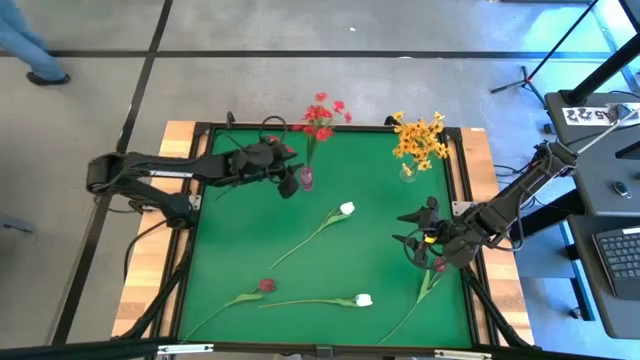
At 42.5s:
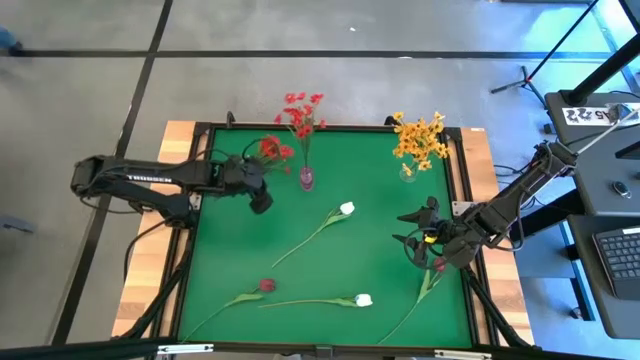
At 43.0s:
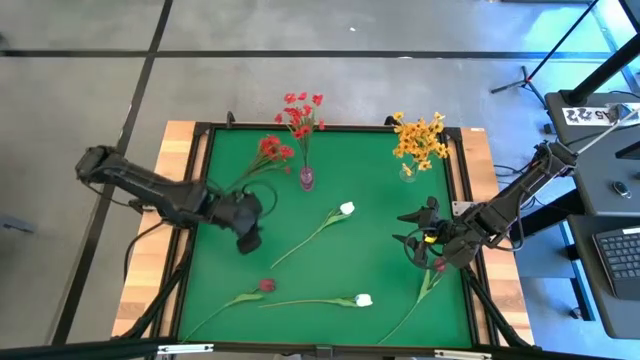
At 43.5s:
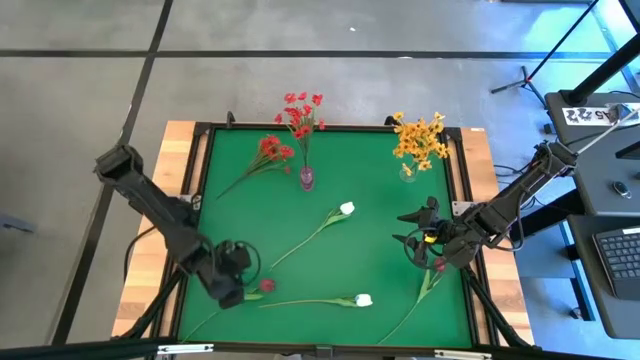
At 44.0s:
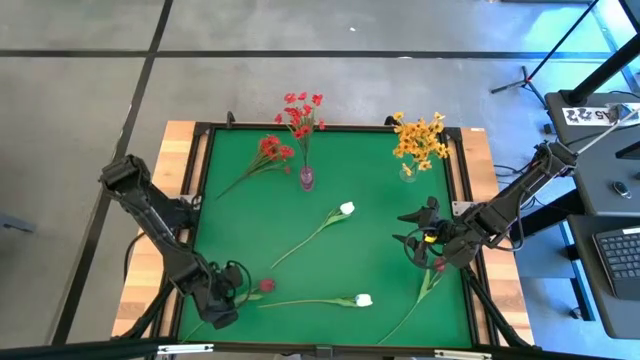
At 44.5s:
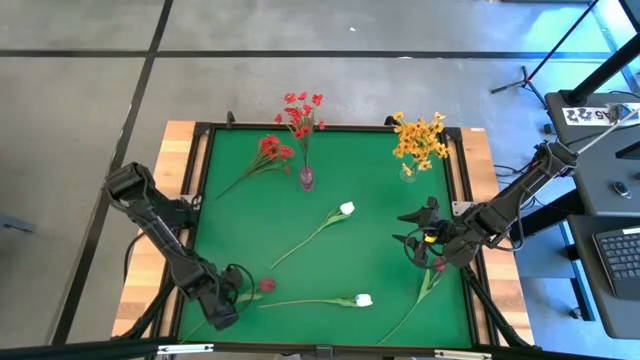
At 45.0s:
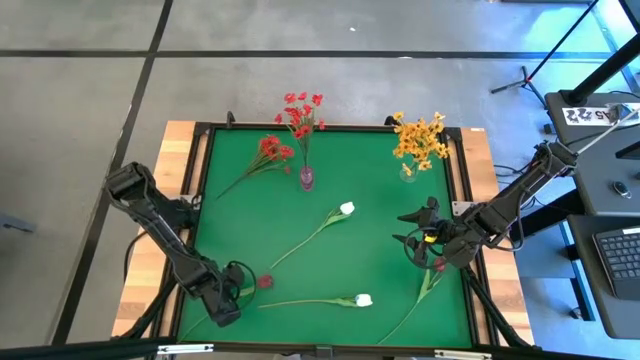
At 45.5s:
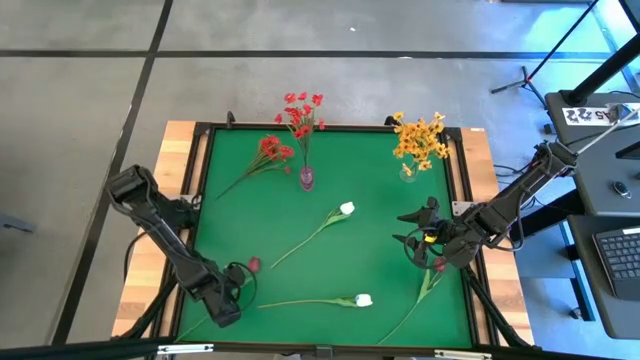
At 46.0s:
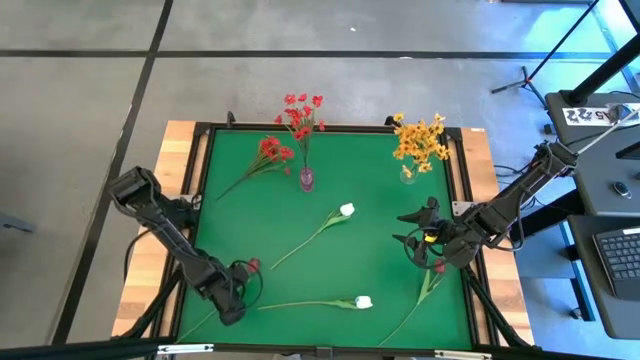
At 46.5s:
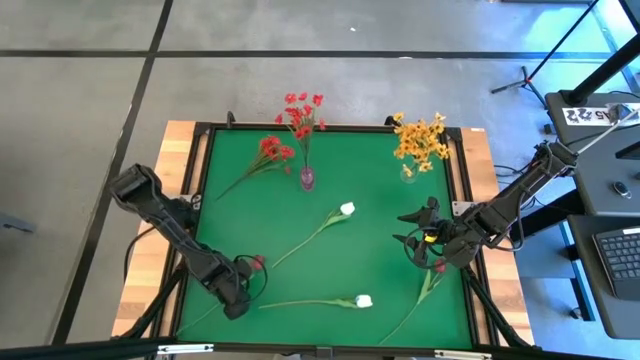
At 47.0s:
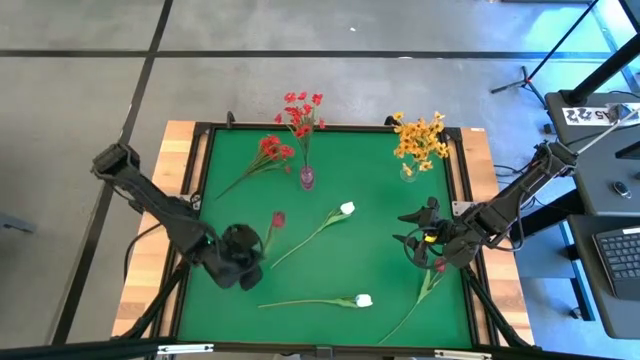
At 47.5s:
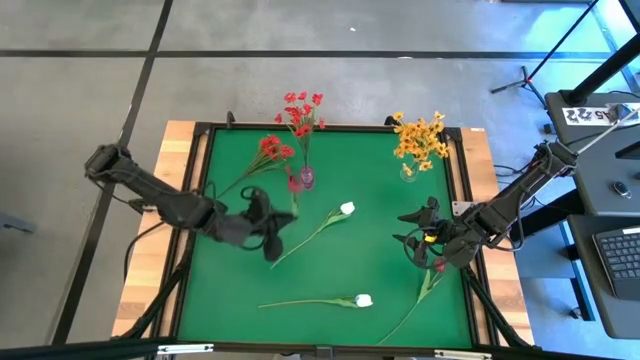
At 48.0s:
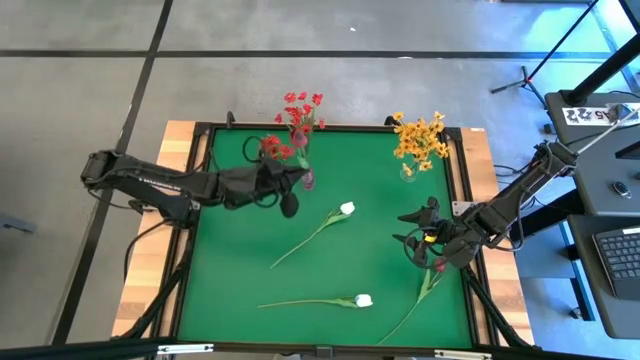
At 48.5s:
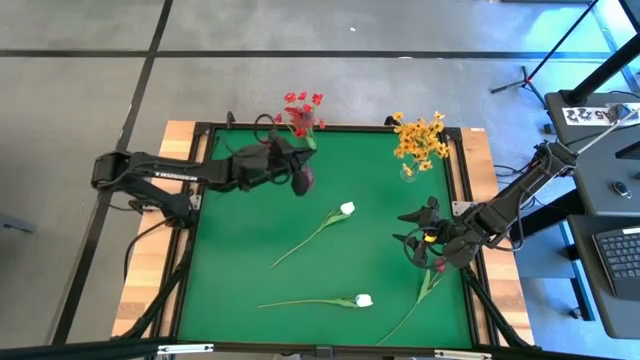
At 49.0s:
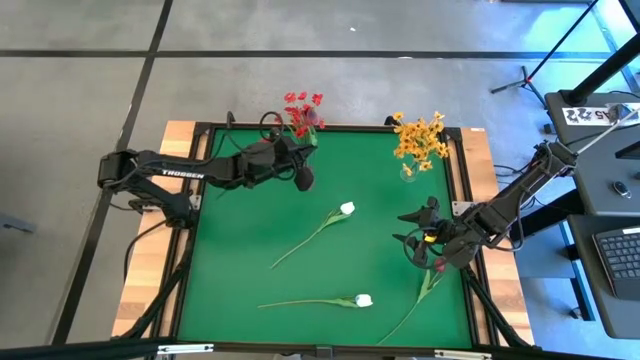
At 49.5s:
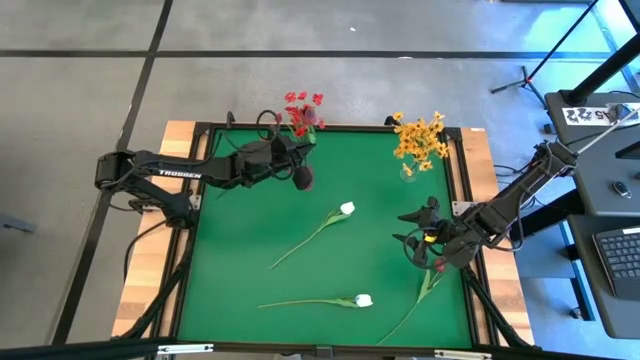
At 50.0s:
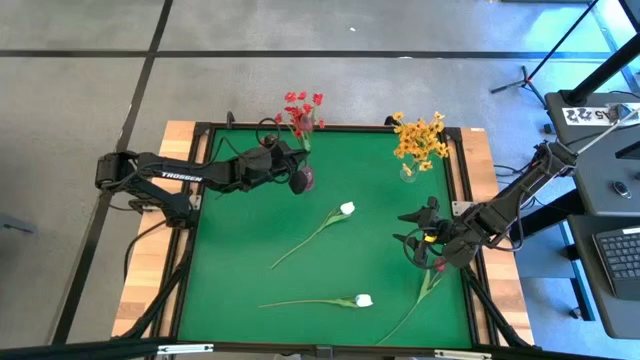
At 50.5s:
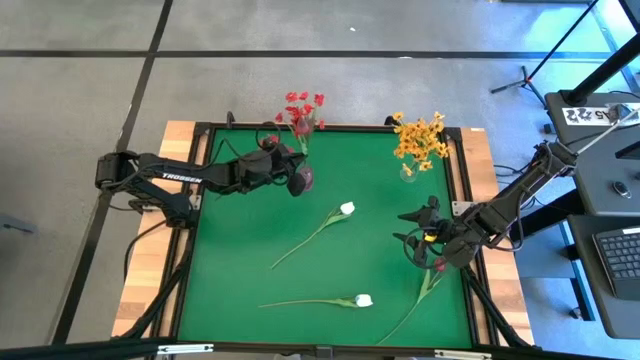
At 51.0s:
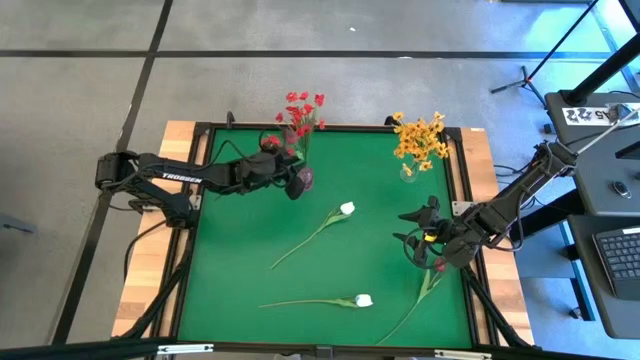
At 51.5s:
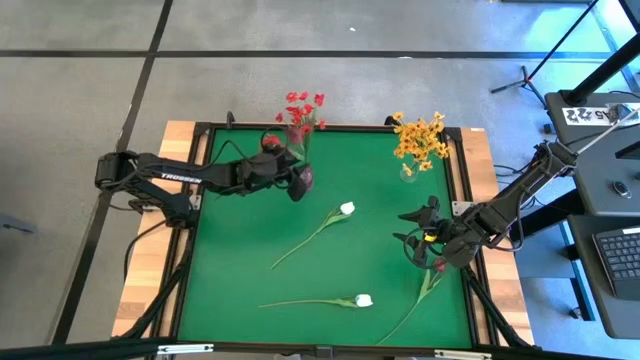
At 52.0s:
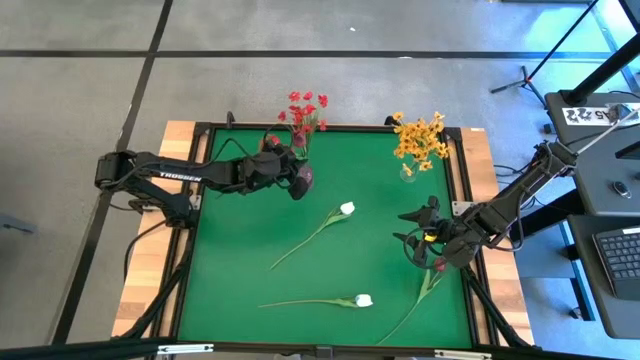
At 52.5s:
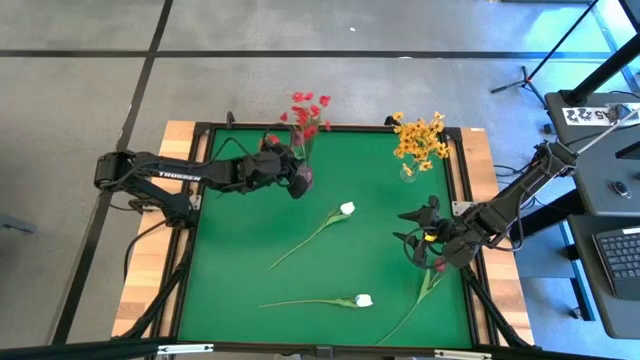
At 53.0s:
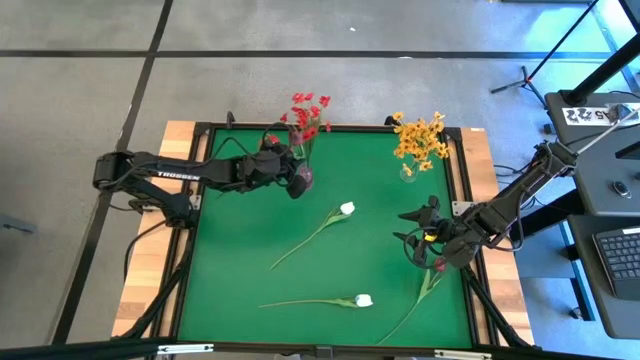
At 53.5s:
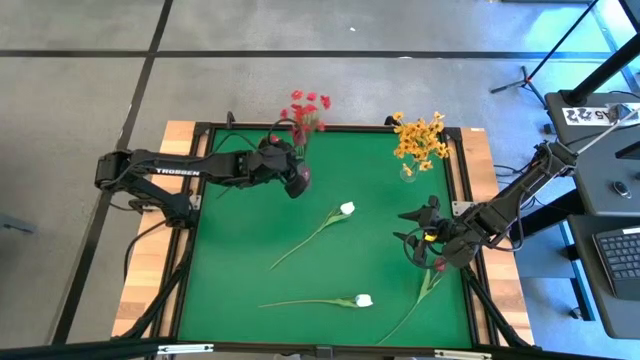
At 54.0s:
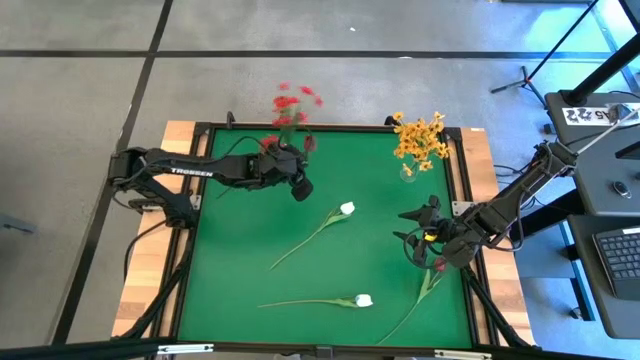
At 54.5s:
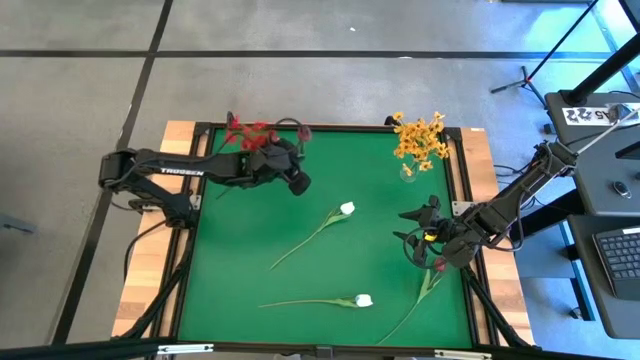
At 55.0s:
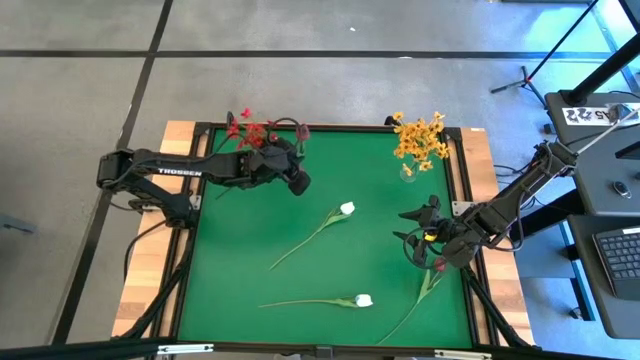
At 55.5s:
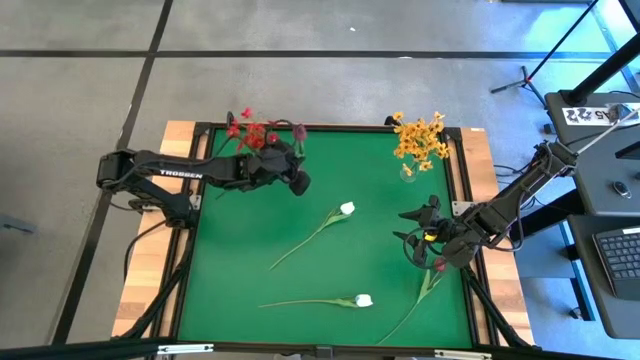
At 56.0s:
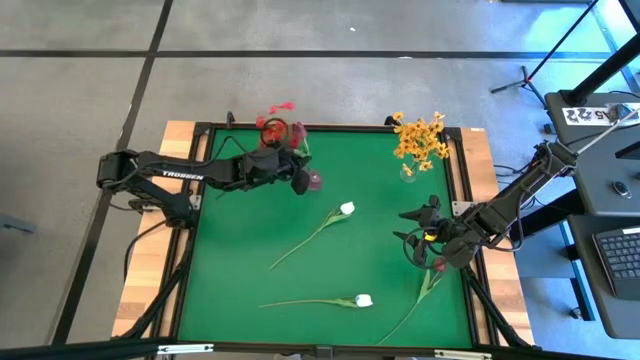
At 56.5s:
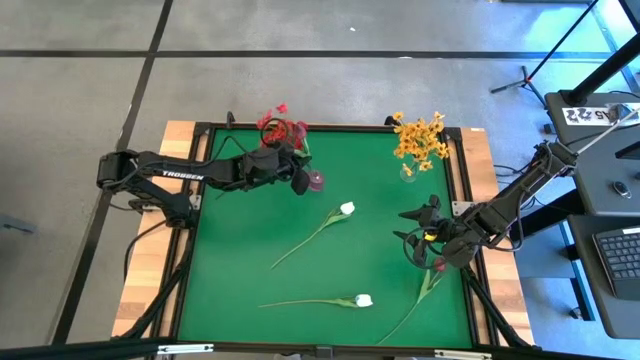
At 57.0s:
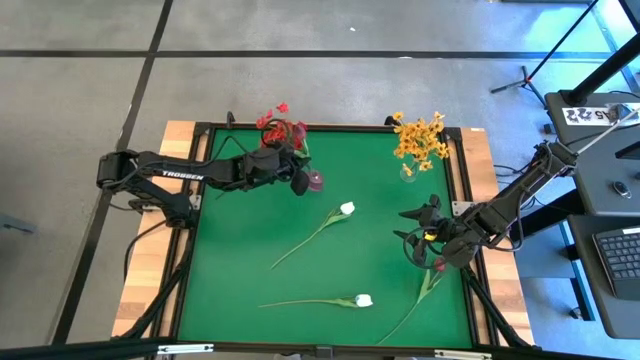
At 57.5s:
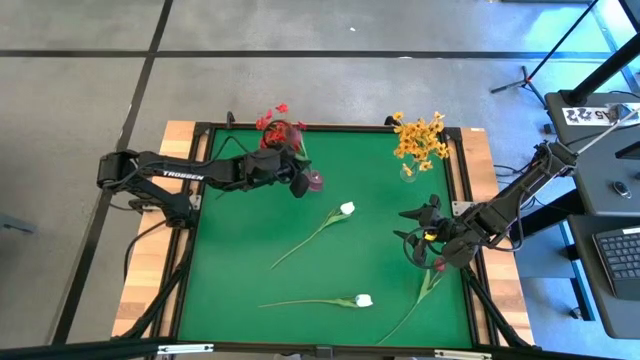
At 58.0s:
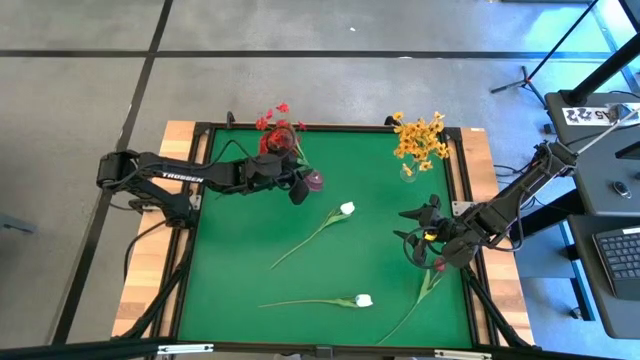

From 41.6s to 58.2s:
Task: Sort flowers into vase by color
Put the left red tulip into the pink vase
